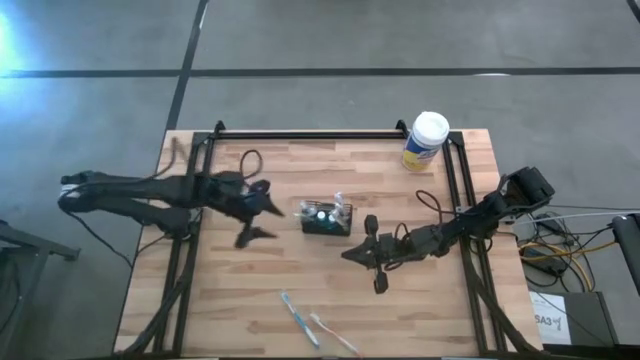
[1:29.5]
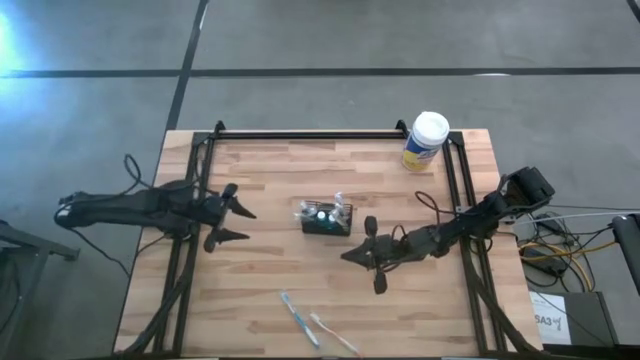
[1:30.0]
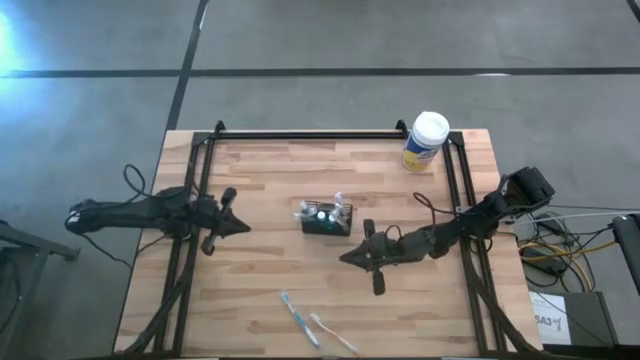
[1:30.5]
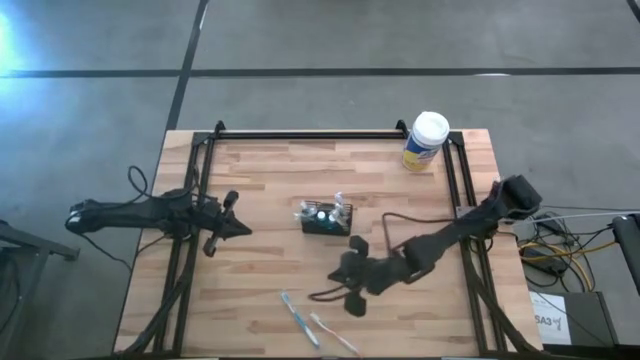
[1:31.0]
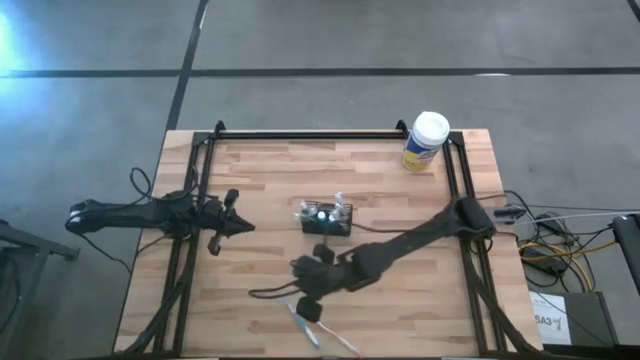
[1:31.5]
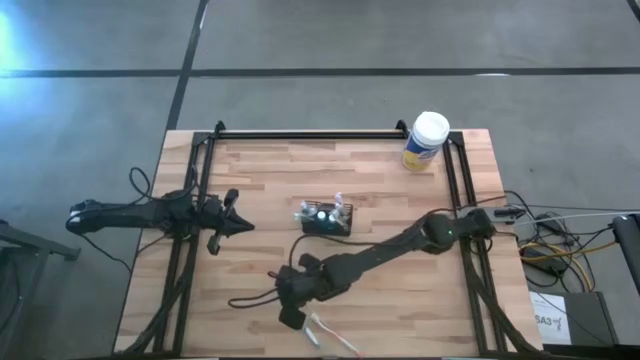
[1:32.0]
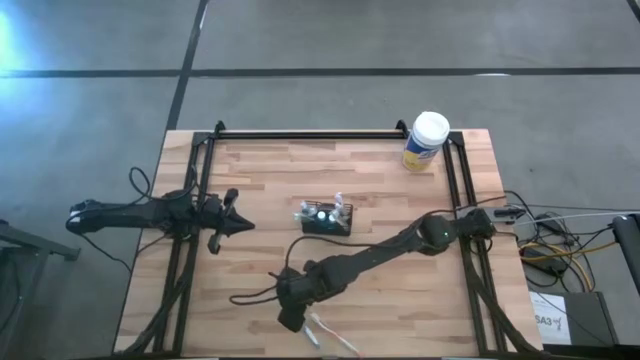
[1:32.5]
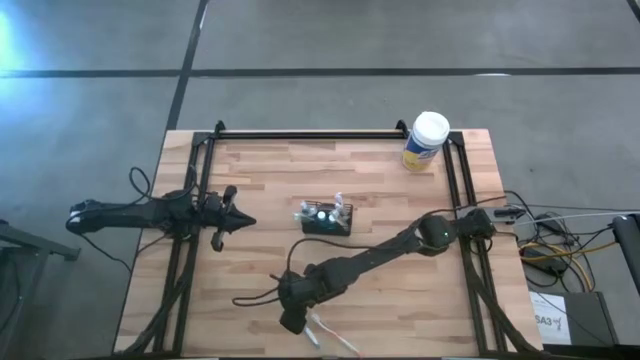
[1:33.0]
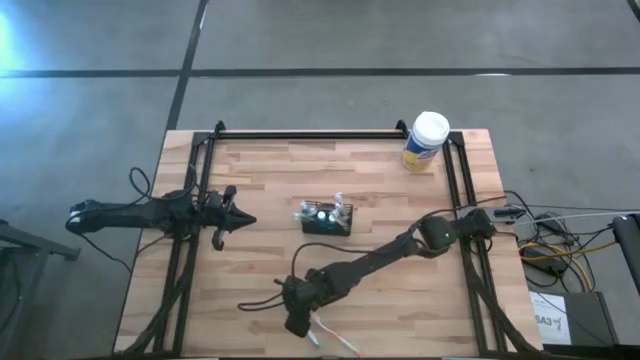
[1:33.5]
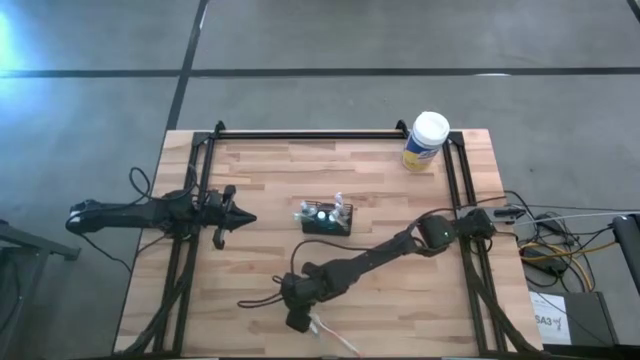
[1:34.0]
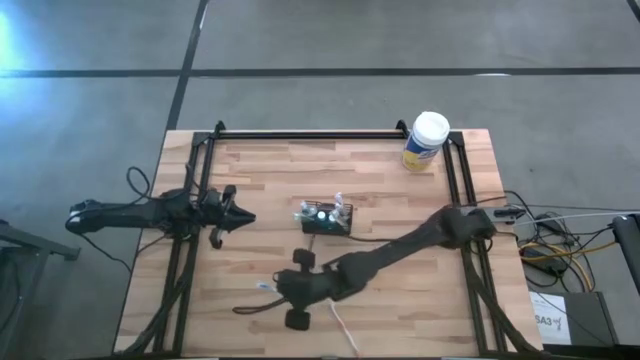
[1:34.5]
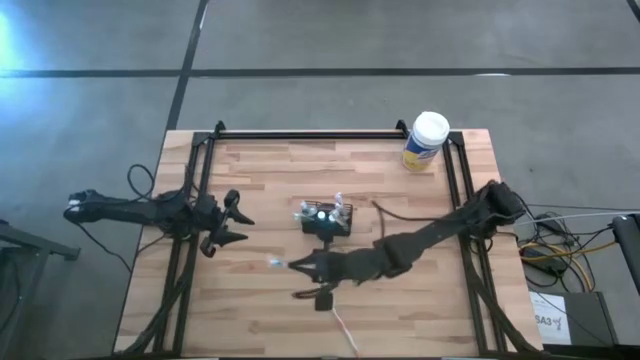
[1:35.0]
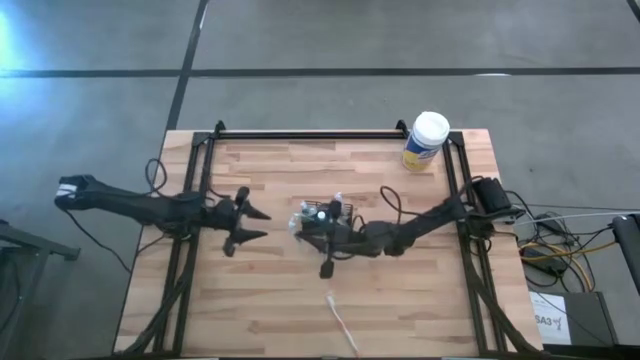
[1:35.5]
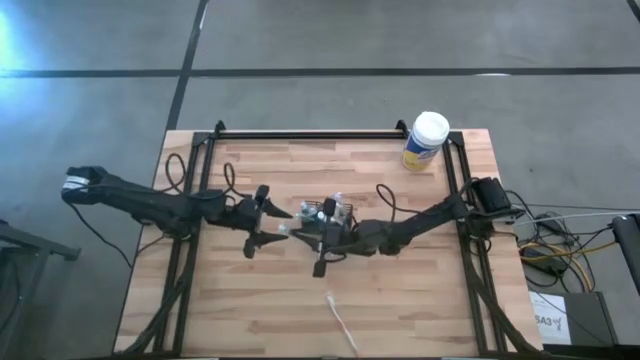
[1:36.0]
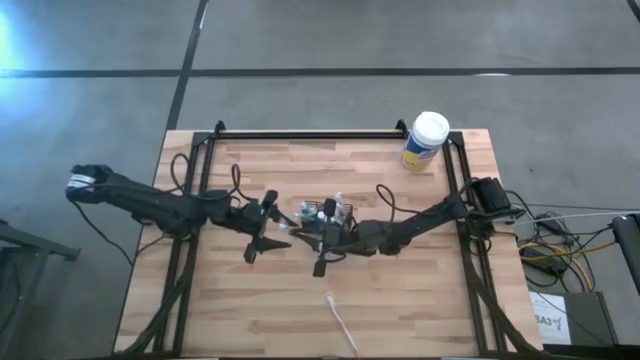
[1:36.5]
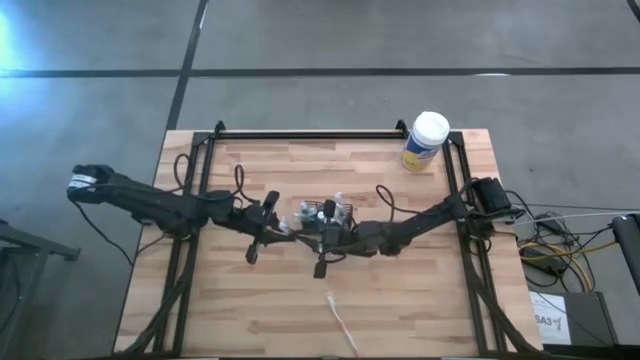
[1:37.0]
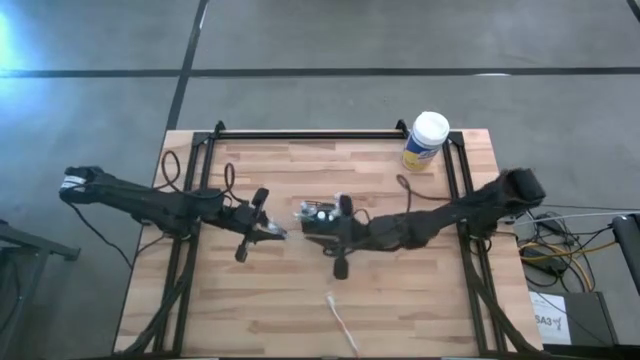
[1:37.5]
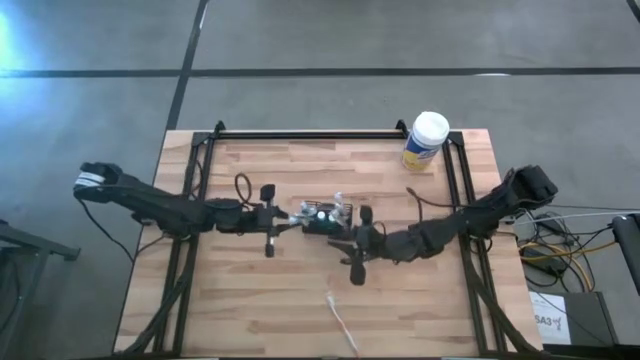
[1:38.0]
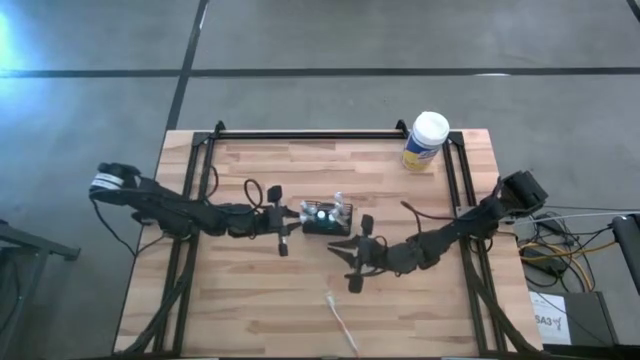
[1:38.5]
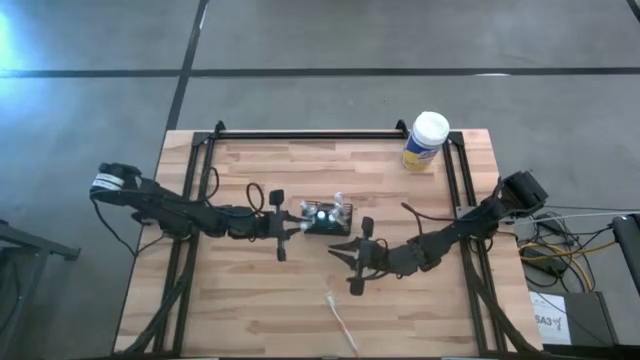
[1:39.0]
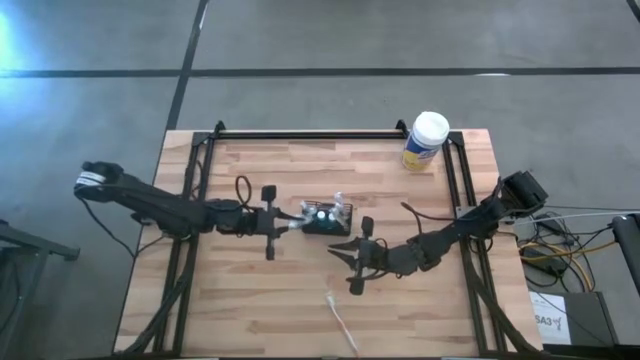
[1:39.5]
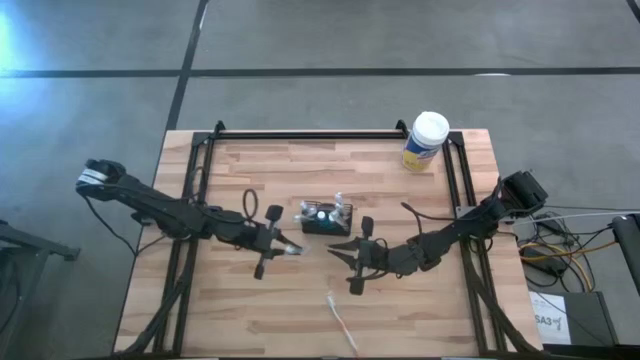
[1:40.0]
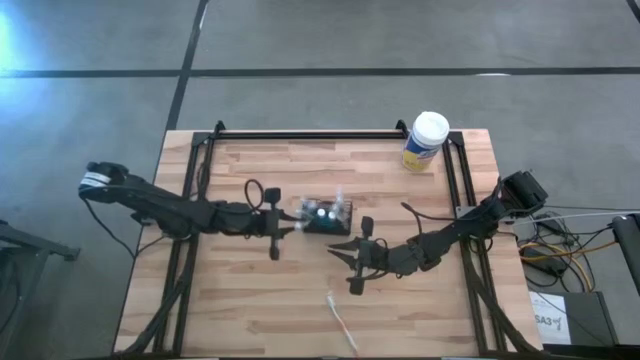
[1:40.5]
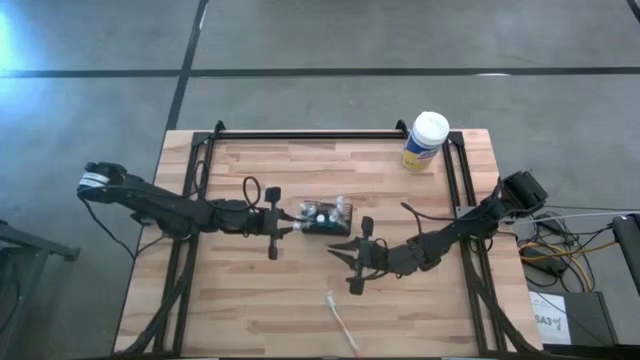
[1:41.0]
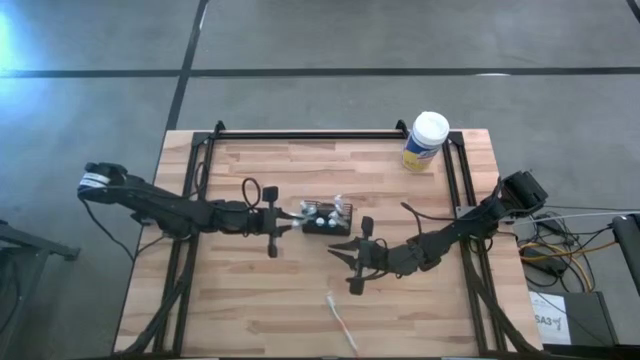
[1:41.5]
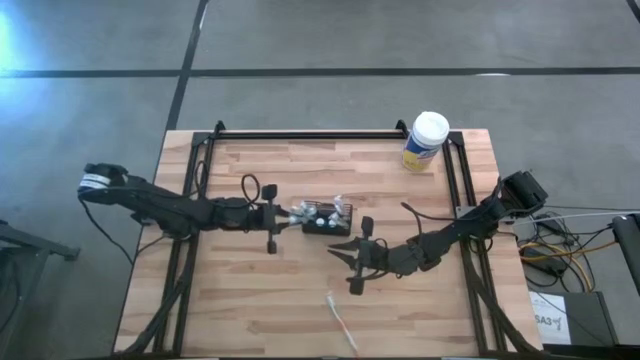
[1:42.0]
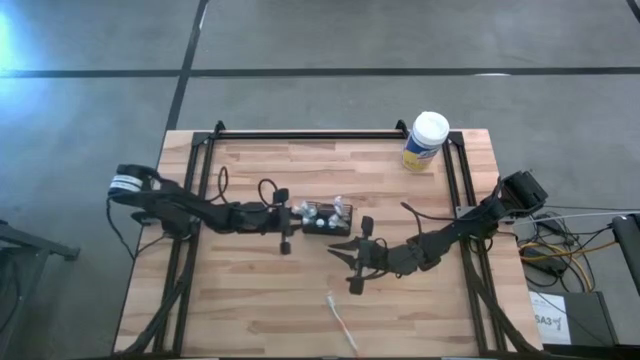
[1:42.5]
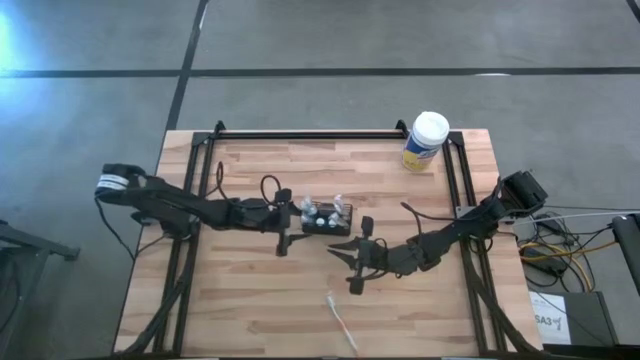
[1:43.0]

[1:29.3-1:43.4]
Task: Pick & Place toothbrushing station
Put the blue toothbrush into the black mesh organizer

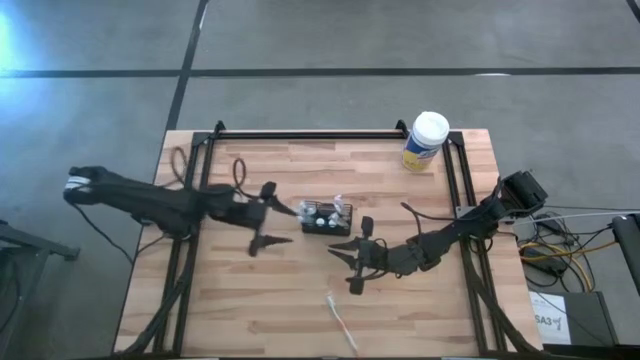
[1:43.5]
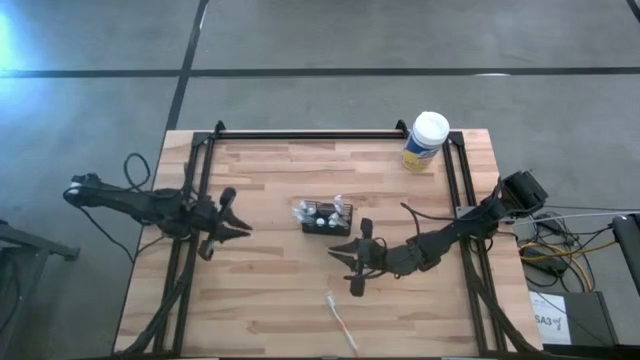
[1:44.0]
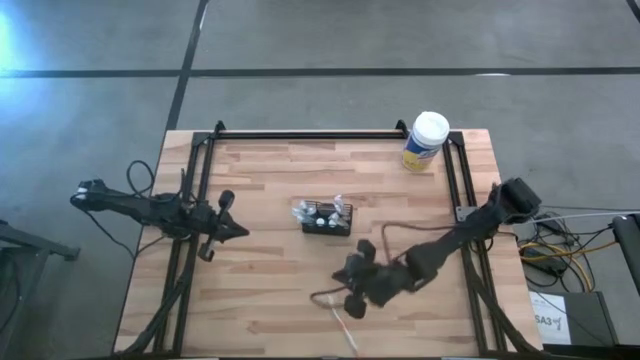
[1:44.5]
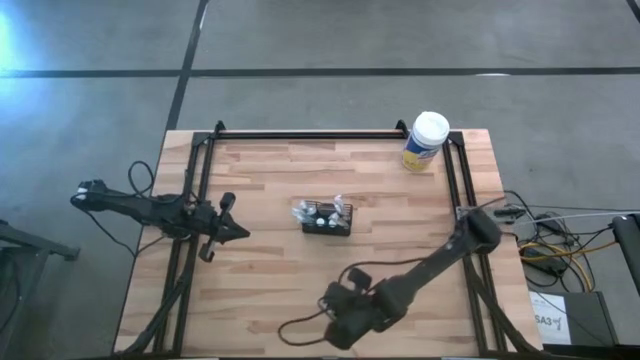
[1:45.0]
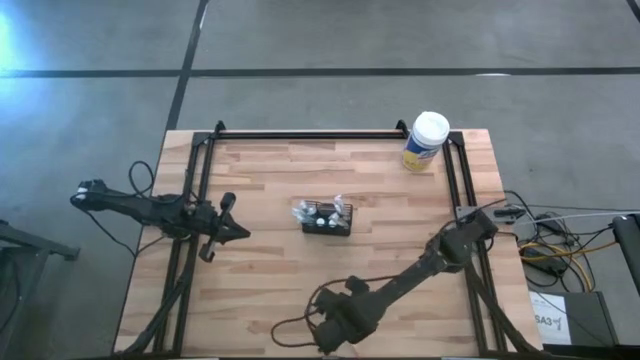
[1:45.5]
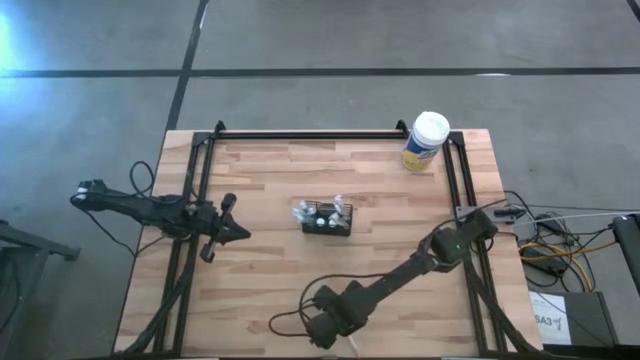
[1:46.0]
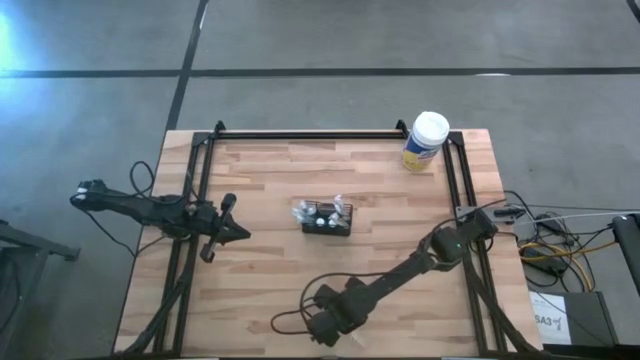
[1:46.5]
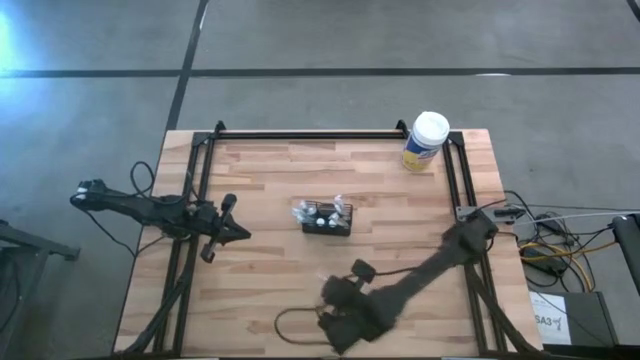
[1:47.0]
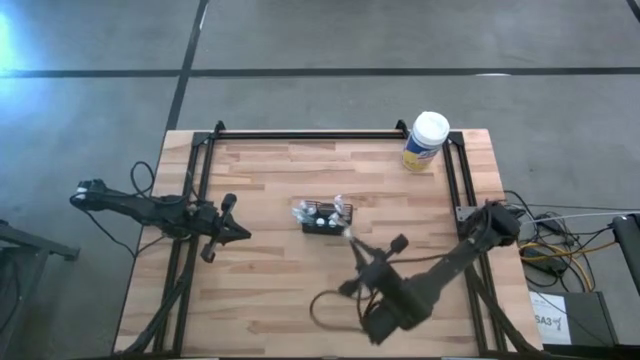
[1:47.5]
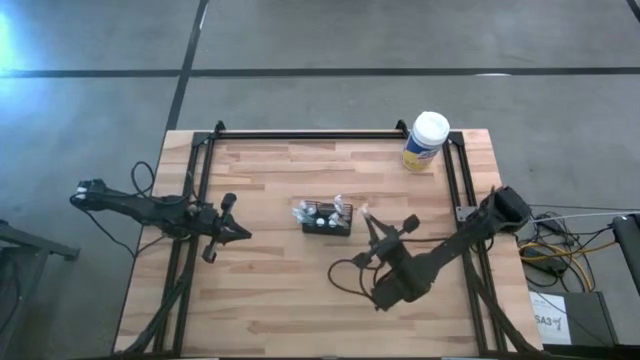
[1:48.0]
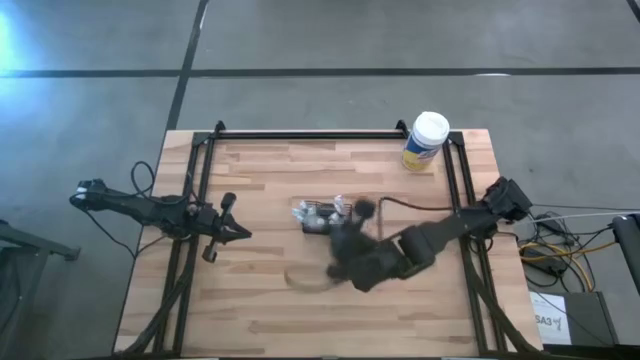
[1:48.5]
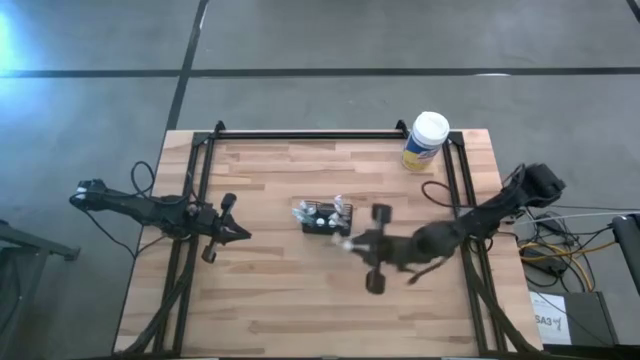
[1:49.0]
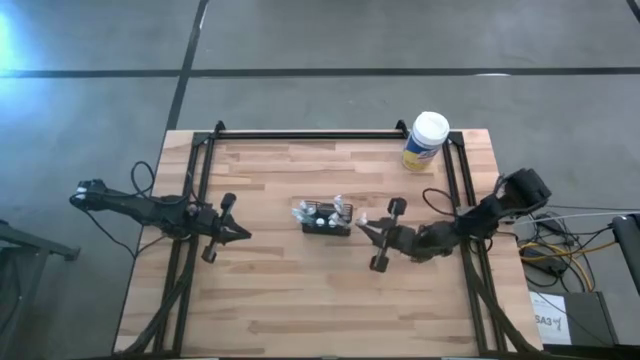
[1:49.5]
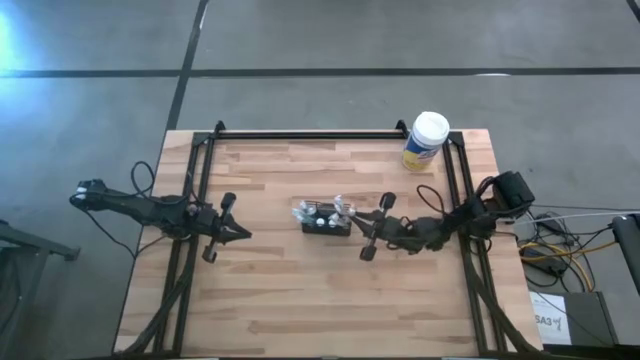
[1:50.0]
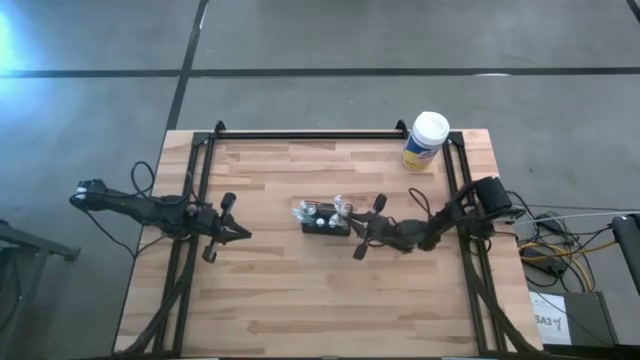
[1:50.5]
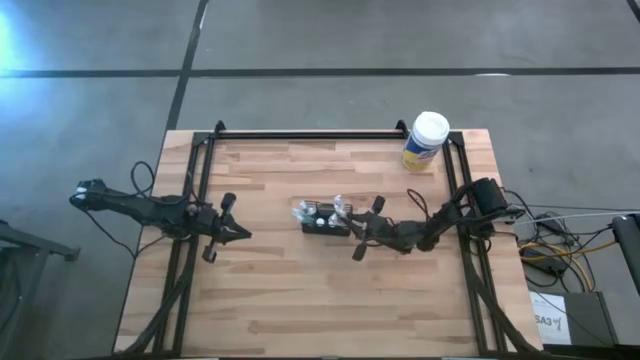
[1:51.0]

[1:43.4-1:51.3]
Put the orange toothbrush into the black mesh organizer
